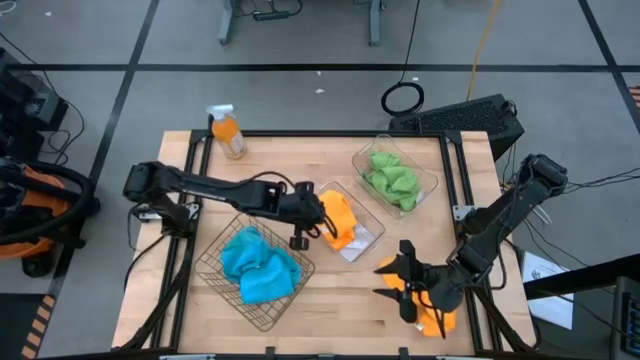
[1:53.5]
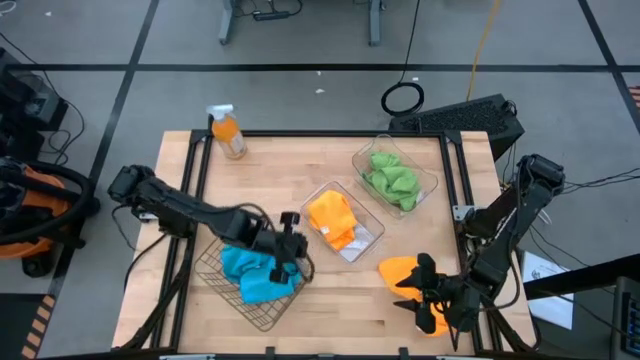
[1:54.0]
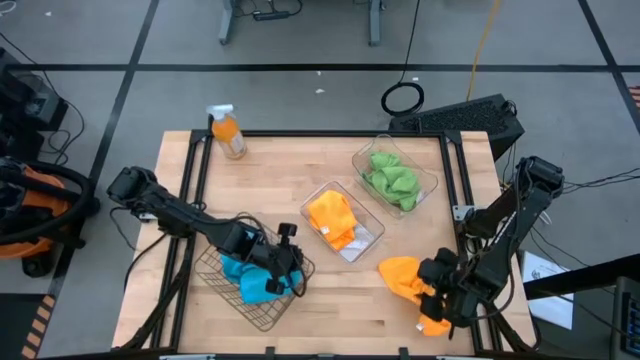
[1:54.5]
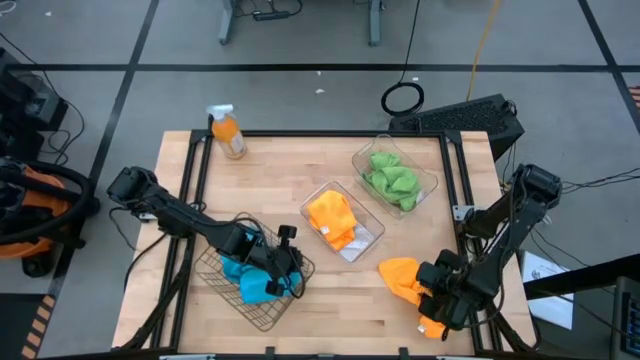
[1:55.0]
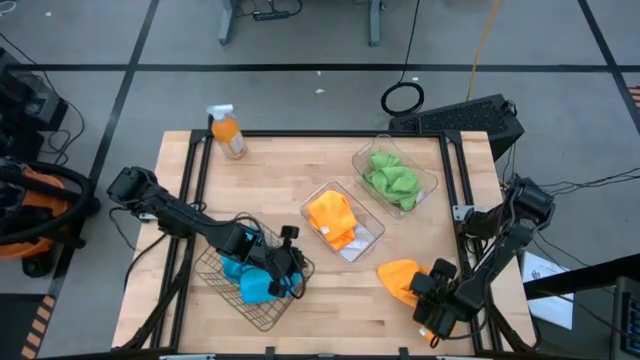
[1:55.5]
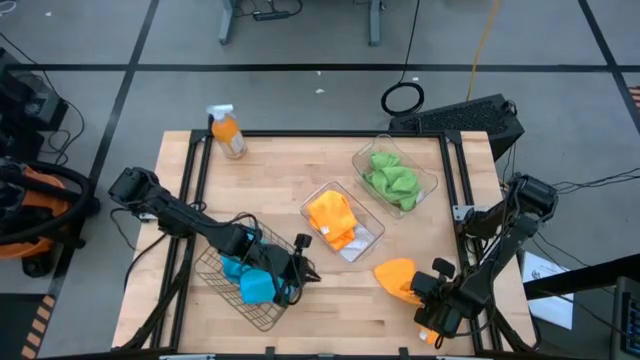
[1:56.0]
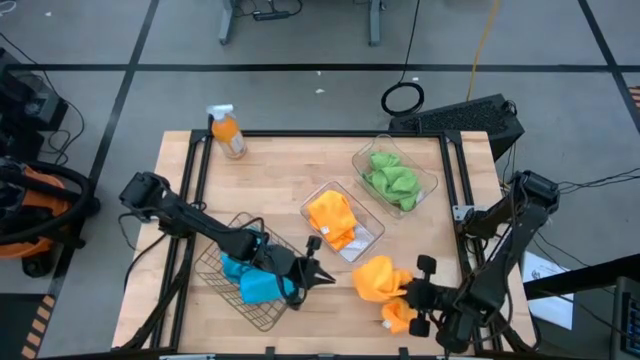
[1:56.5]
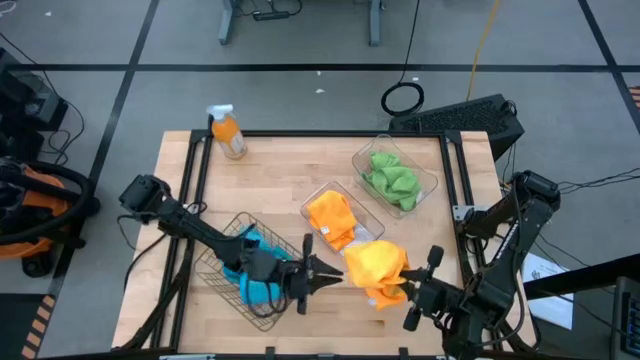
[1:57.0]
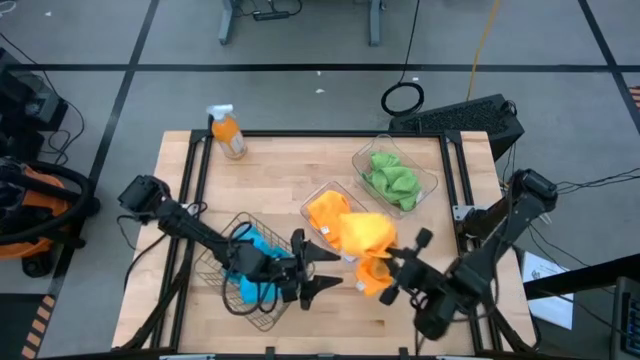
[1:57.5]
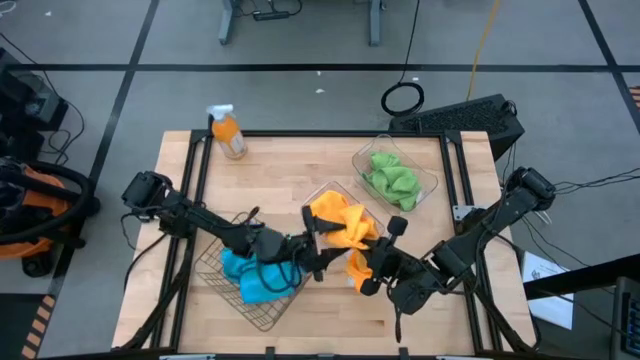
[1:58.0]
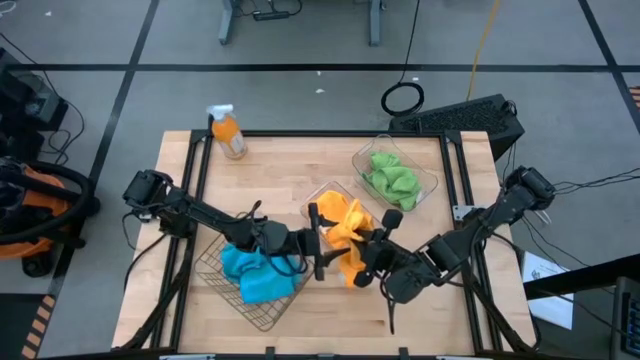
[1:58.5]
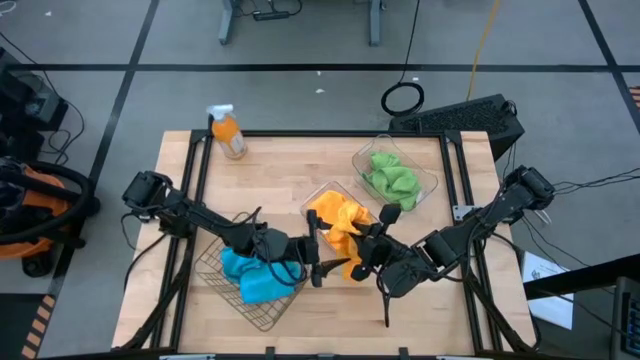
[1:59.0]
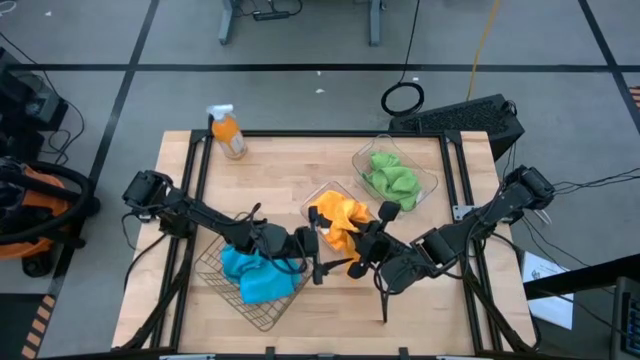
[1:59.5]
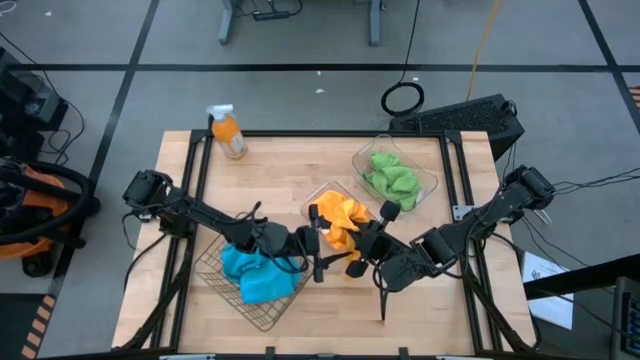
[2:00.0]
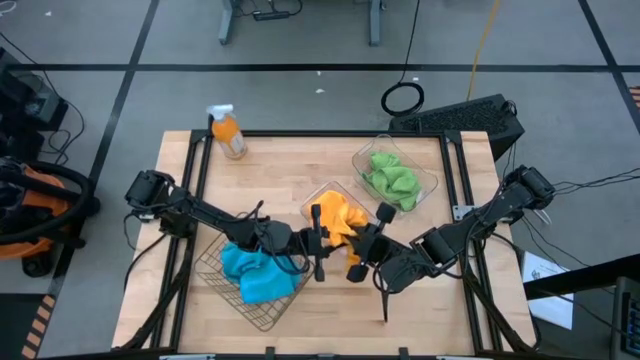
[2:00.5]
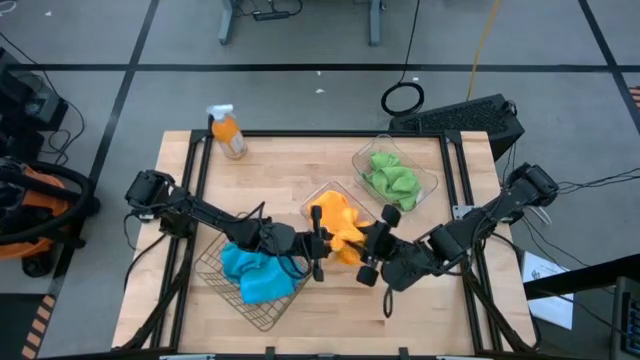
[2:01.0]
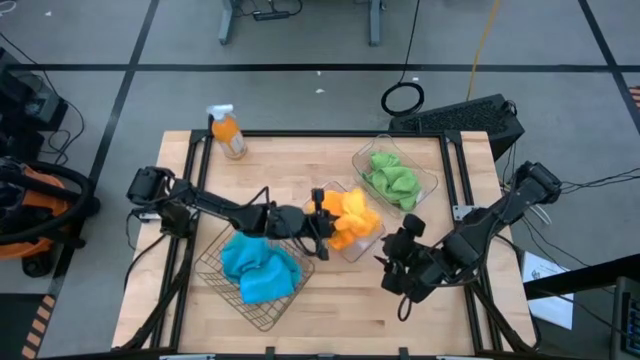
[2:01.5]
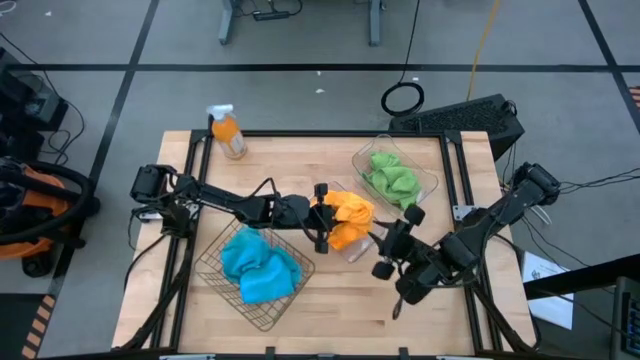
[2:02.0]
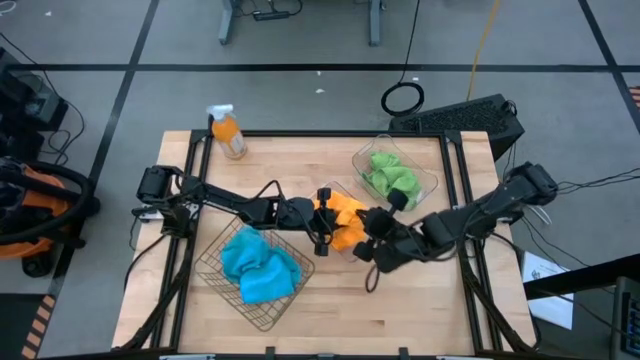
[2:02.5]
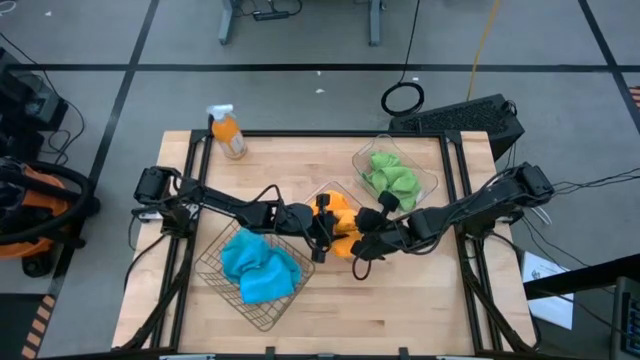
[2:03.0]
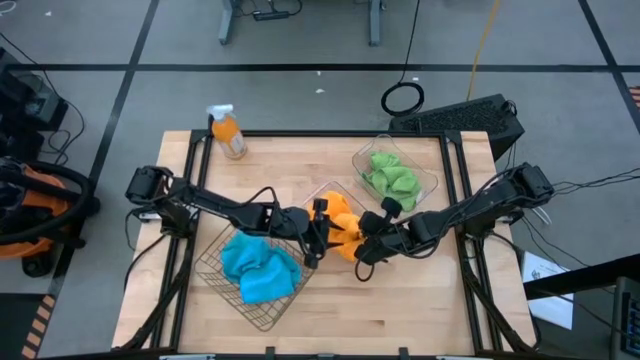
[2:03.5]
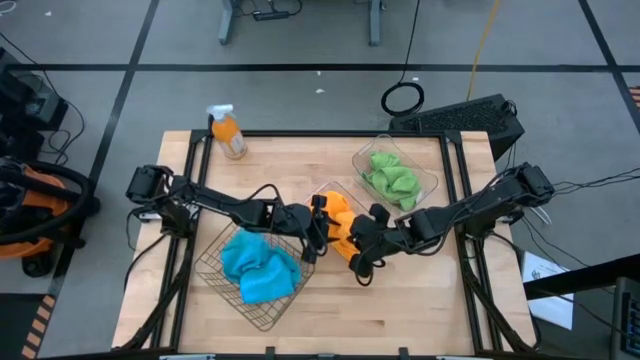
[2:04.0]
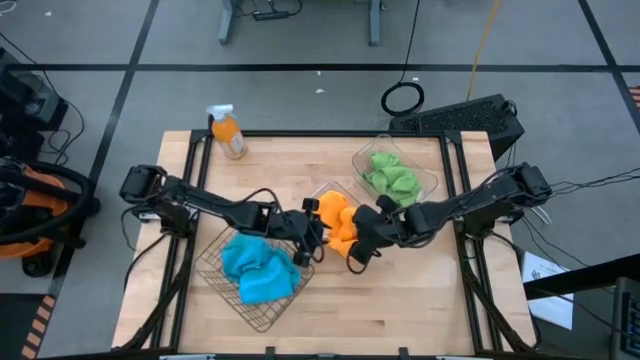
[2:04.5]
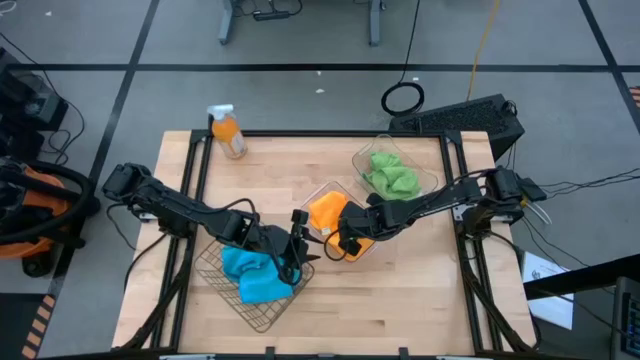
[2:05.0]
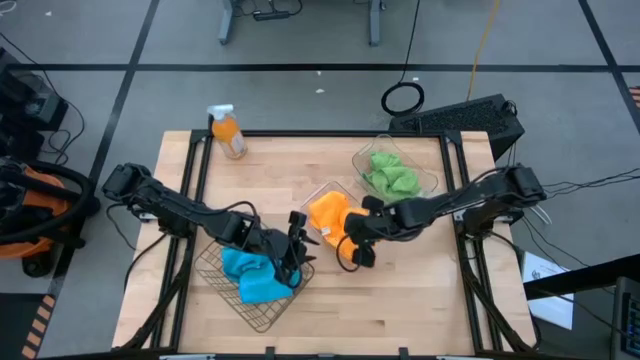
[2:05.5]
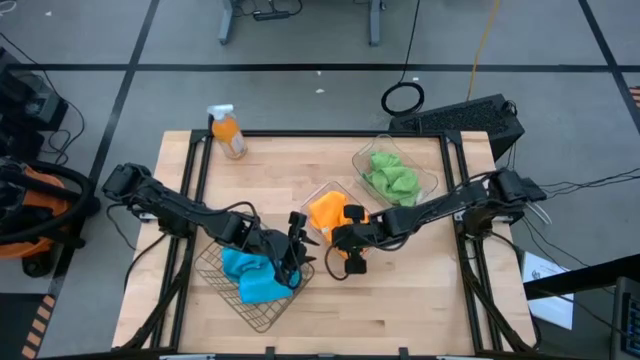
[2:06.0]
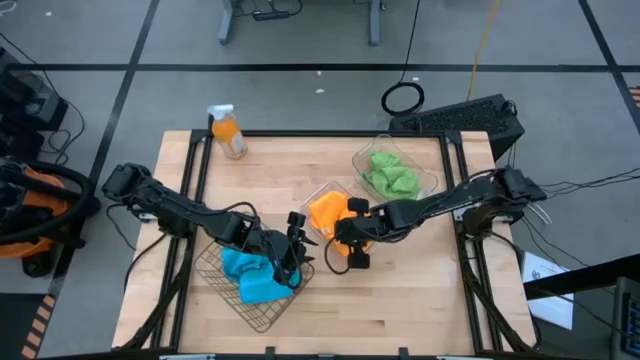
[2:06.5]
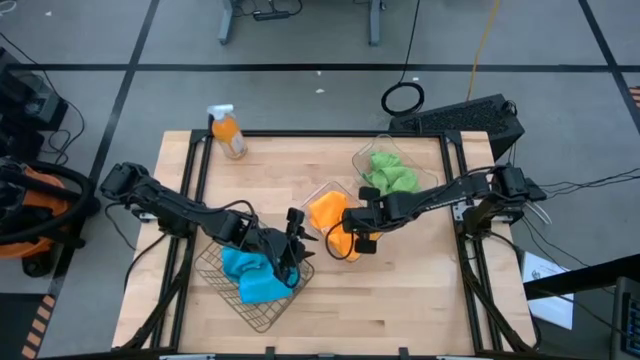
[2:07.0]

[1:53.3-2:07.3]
Task: Sort microfiber towel by color & place in baskets
Put the orange microfiber towel into the bottom transparent bin

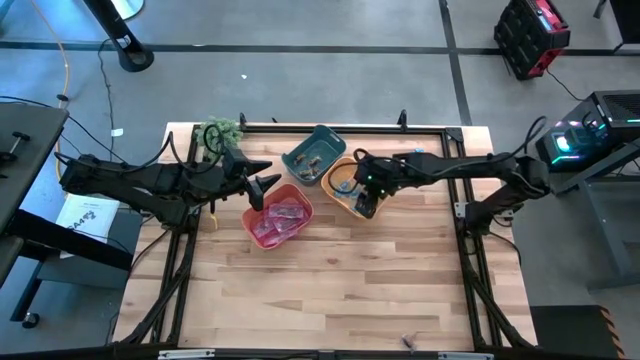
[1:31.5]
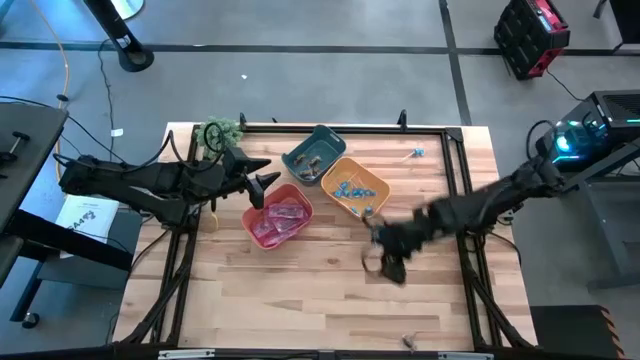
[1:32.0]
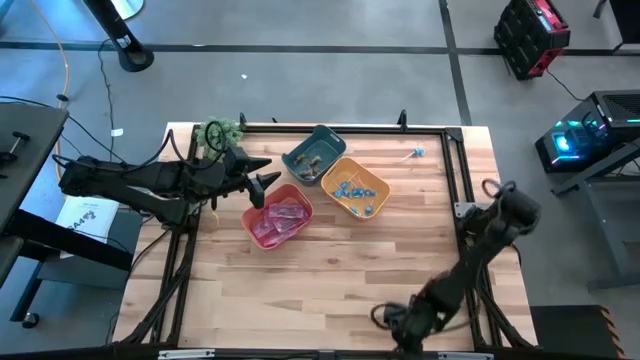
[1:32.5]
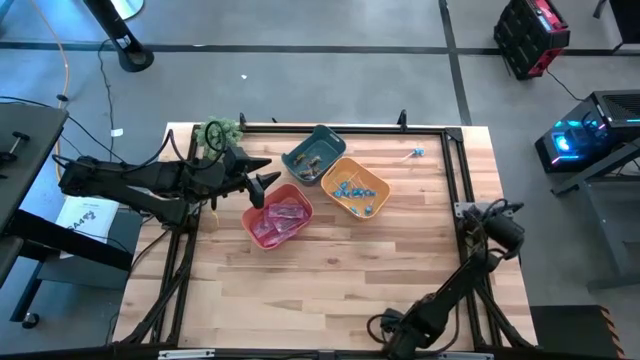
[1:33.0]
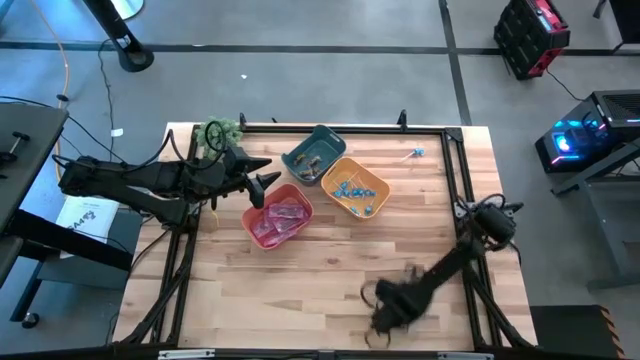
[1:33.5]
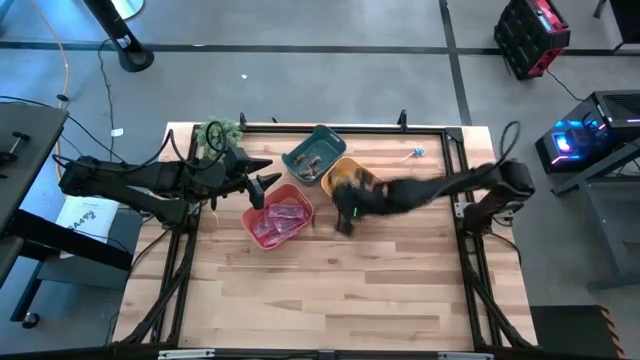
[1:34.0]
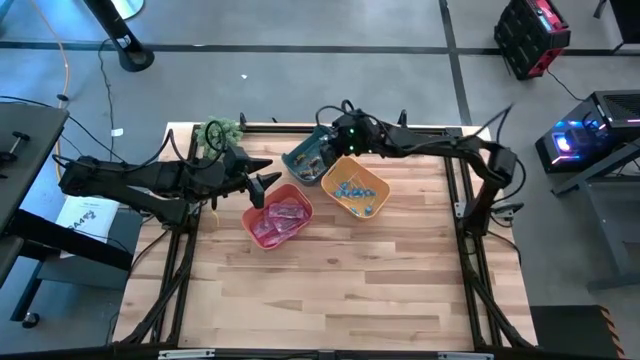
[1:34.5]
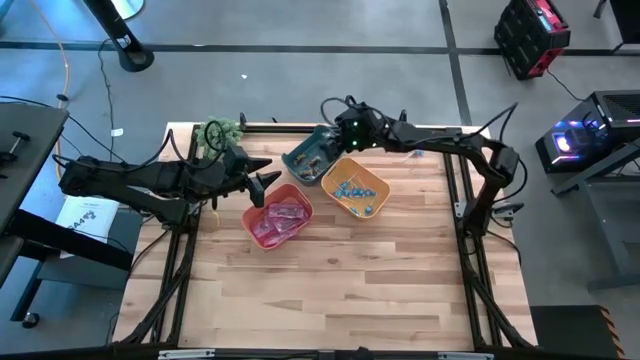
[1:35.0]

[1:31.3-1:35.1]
Task: Sort candy
Put the black candy into the blue bin

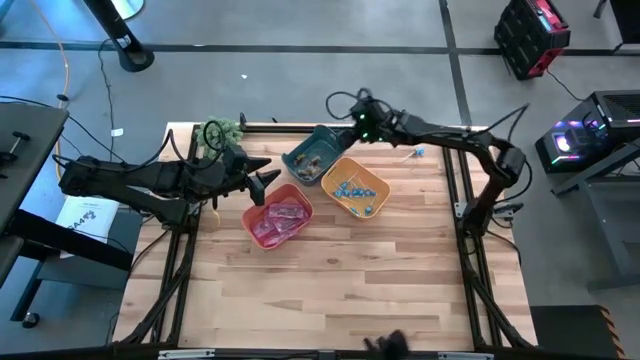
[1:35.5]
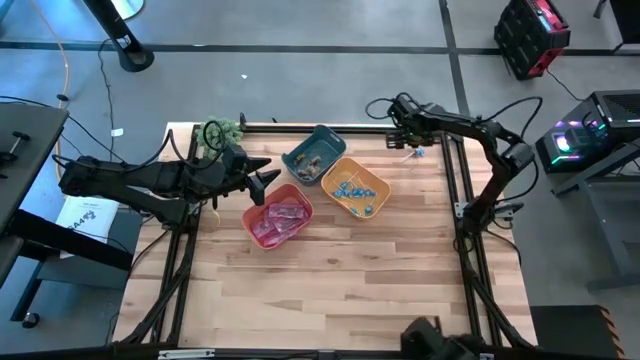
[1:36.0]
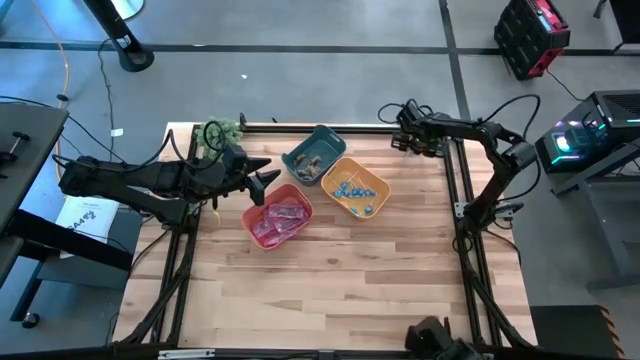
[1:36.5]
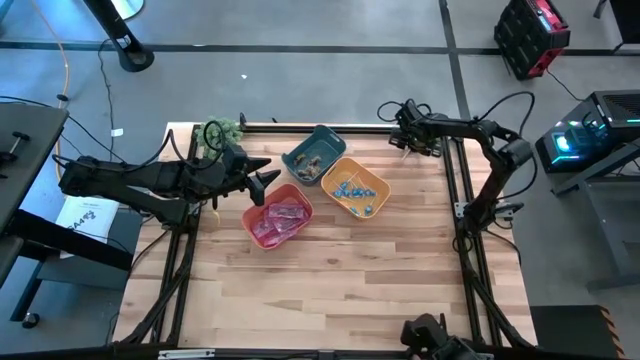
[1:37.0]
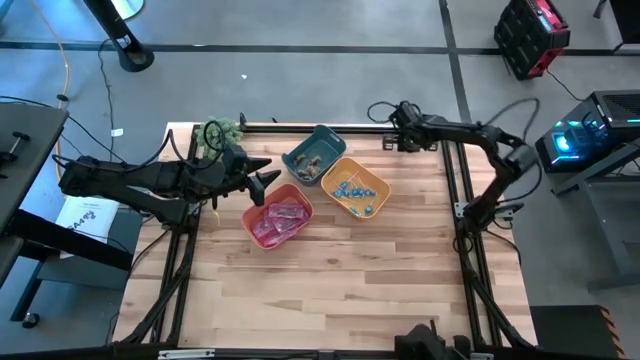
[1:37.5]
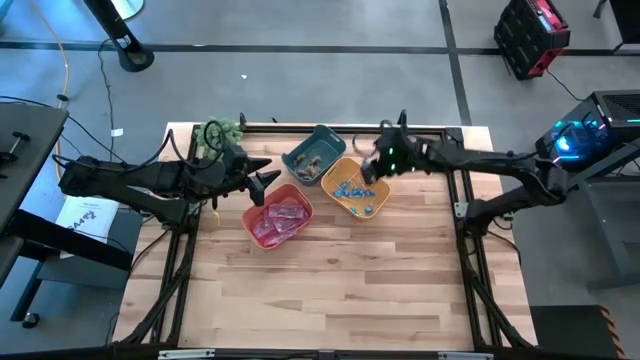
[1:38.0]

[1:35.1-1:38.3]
Put the blue candy into the yellow bin
